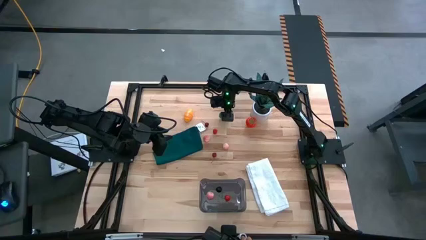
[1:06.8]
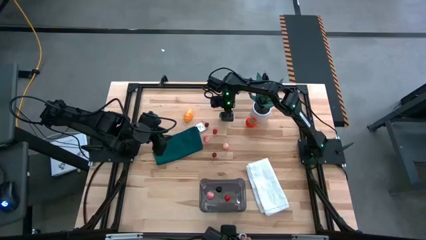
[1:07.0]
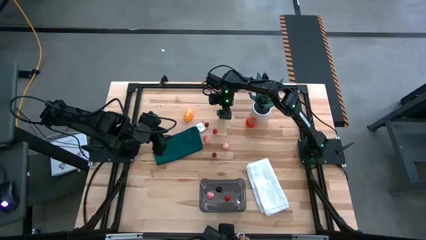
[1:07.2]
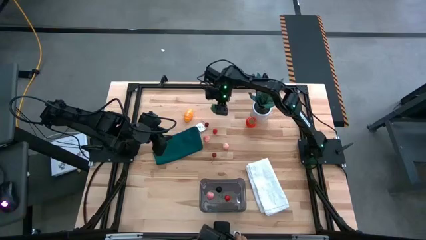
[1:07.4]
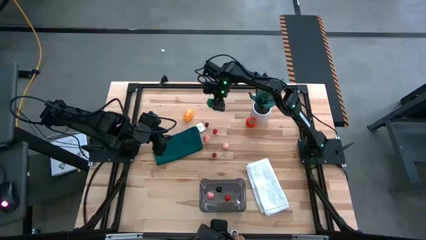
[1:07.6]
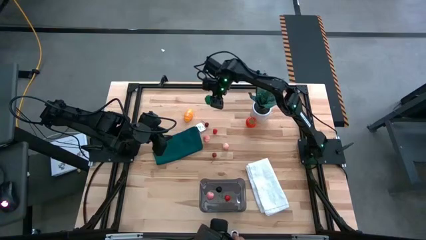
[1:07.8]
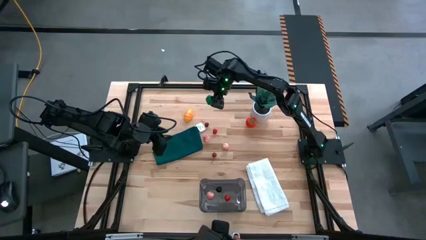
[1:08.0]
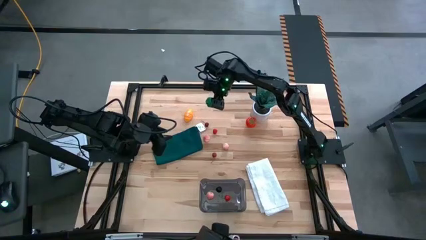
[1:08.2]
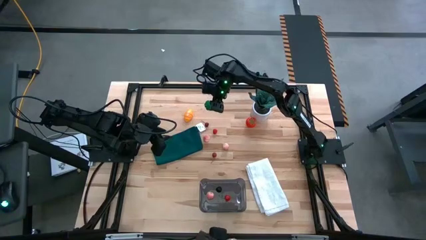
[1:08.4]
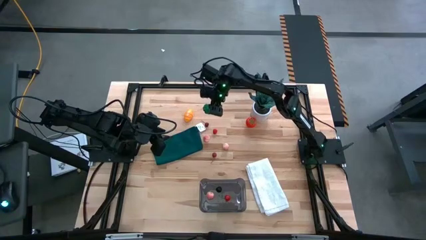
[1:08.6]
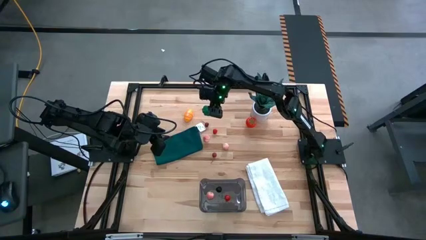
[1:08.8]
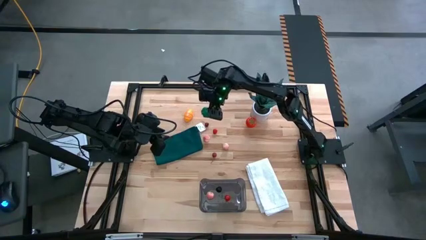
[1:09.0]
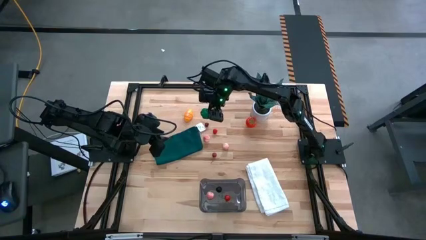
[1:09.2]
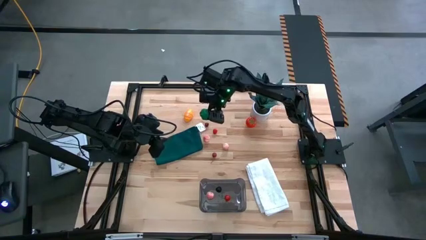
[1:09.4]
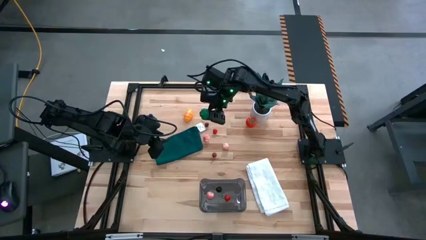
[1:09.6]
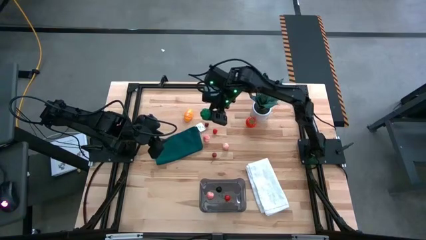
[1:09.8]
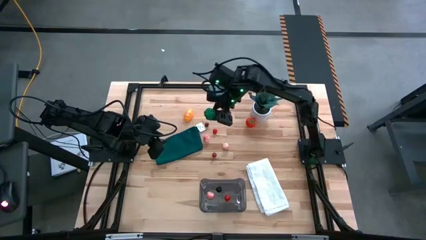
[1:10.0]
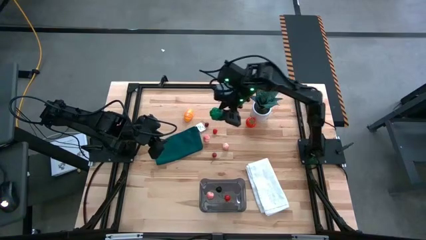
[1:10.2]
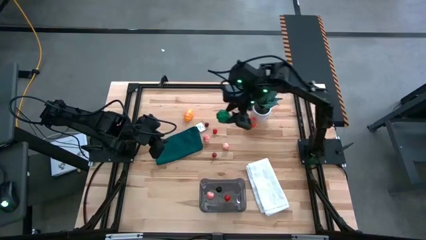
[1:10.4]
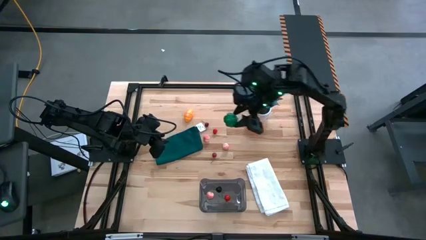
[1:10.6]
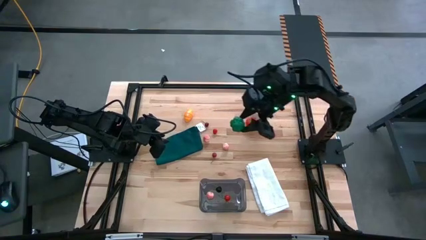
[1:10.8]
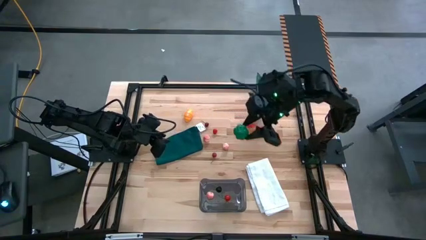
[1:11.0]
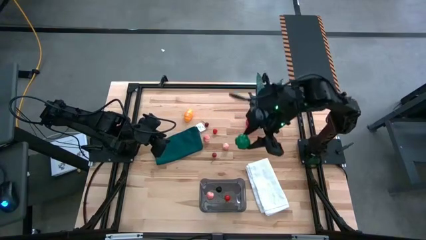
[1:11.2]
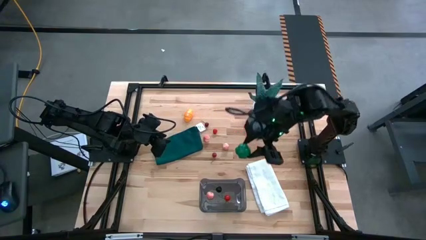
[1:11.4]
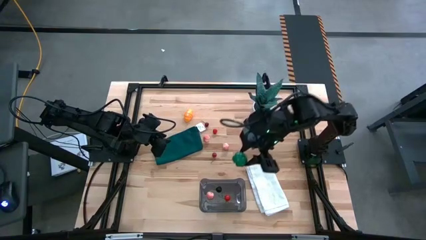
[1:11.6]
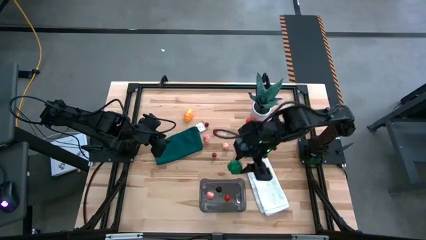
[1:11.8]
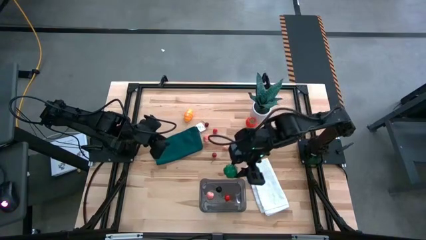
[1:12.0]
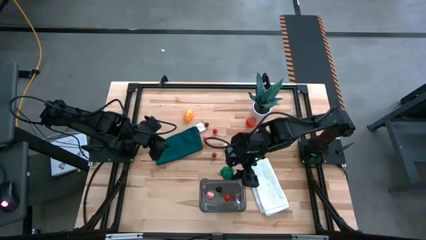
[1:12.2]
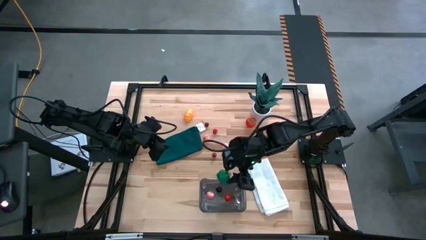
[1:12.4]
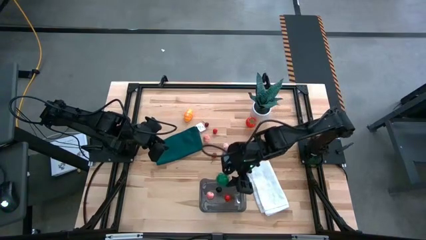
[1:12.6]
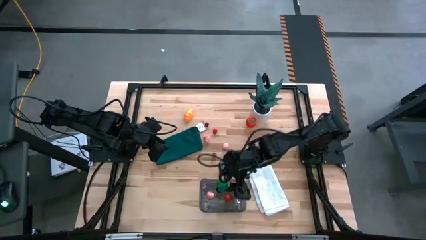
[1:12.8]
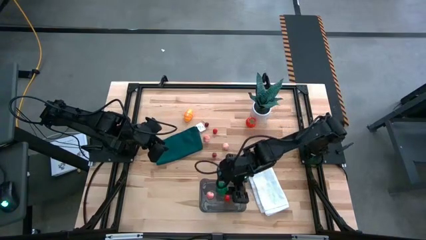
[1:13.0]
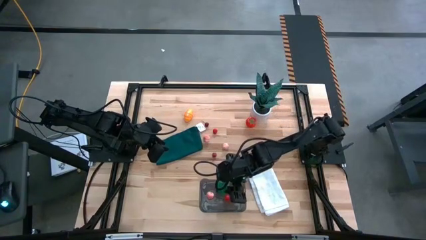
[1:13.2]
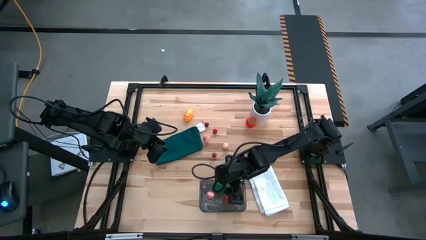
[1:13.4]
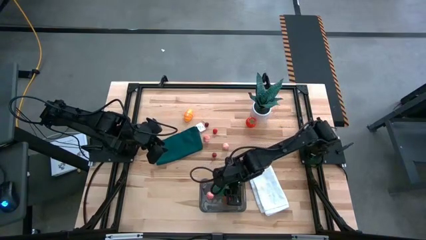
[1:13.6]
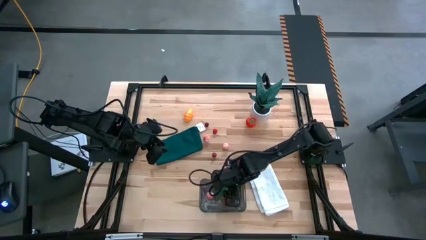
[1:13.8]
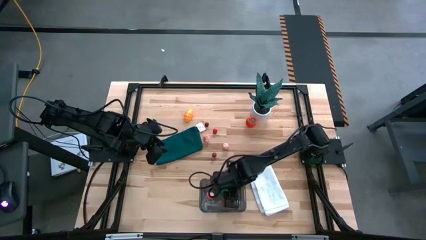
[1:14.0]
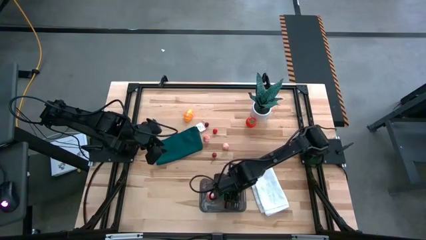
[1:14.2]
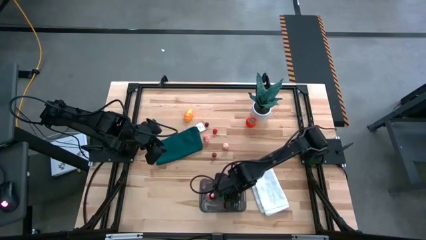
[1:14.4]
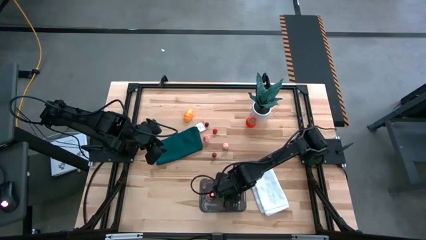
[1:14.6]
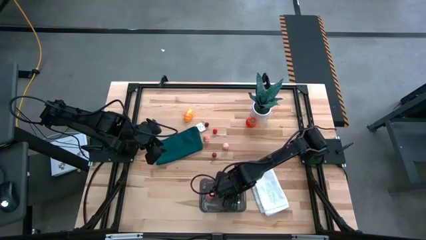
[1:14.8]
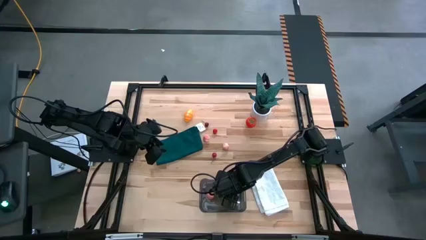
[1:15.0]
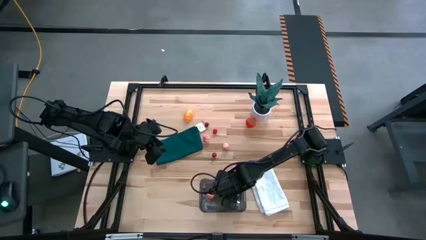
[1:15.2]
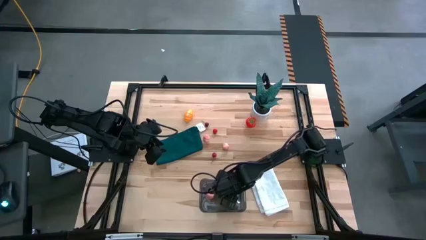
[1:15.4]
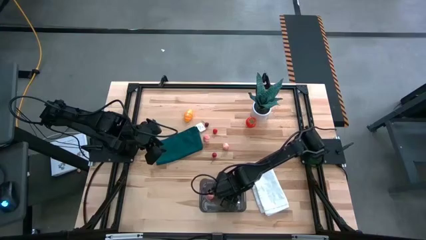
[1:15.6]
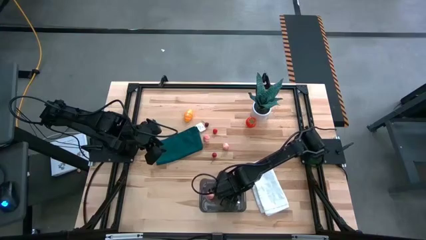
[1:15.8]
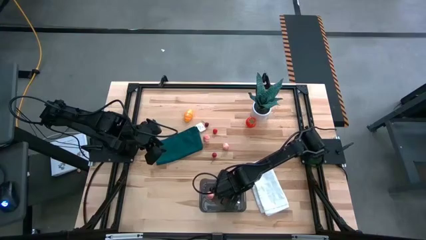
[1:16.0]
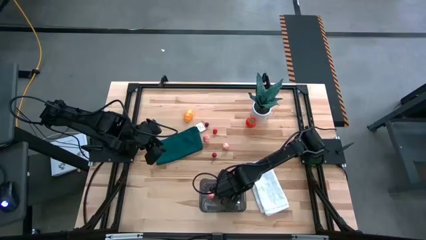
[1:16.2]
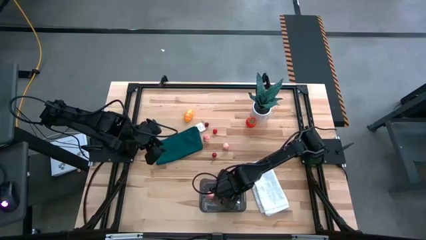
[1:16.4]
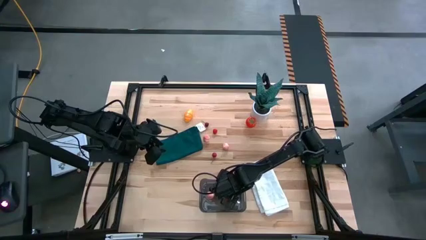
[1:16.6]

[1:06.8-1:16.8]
Task: Pick and placing Produce into tupperware
Put the green bell pepper into the black bin

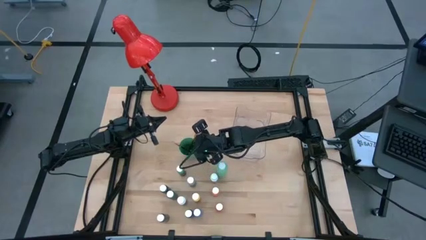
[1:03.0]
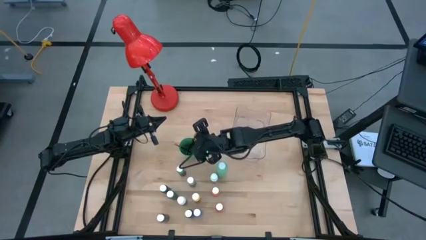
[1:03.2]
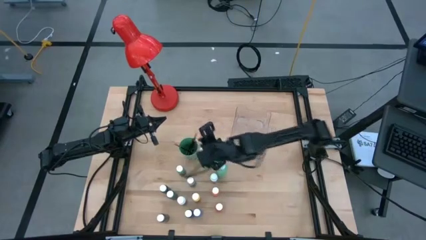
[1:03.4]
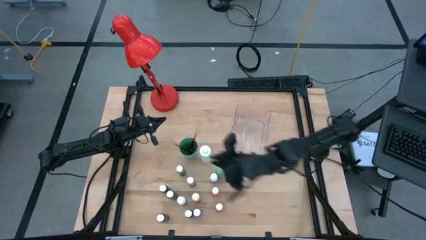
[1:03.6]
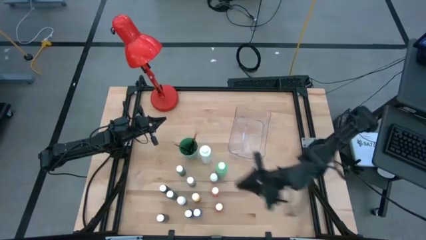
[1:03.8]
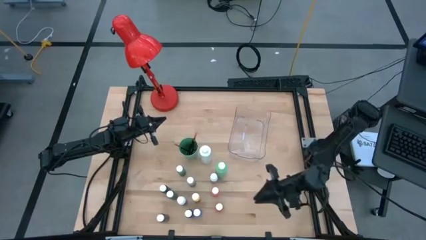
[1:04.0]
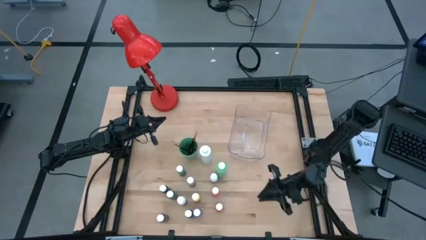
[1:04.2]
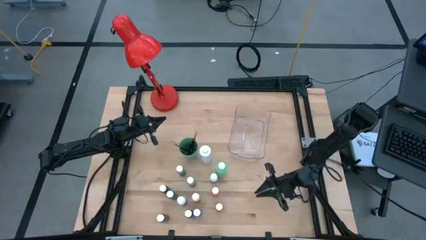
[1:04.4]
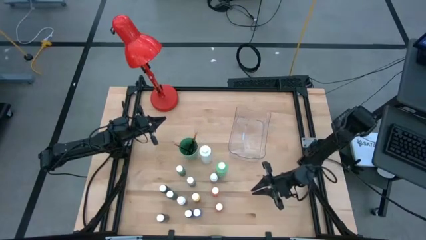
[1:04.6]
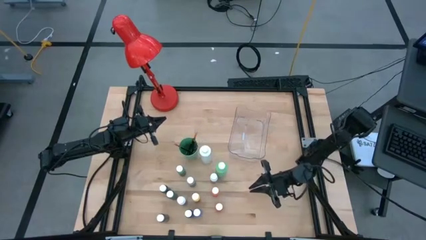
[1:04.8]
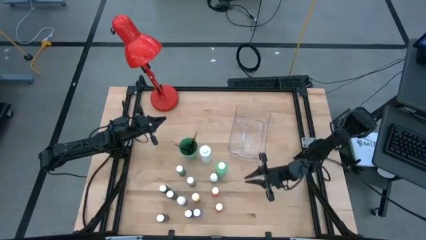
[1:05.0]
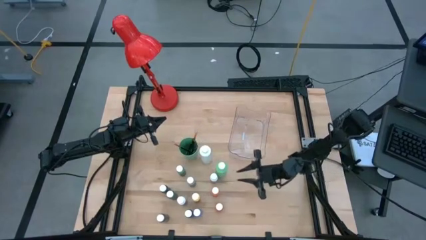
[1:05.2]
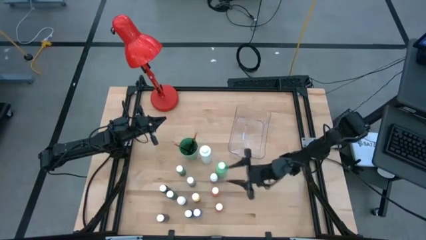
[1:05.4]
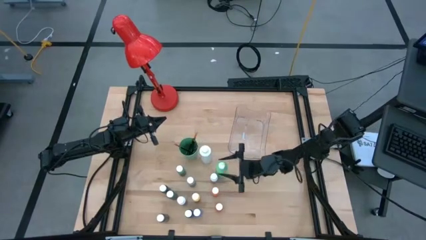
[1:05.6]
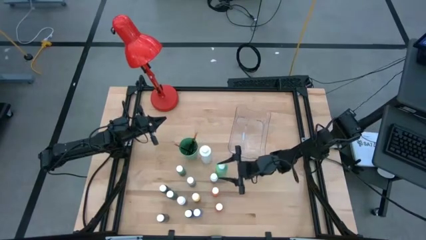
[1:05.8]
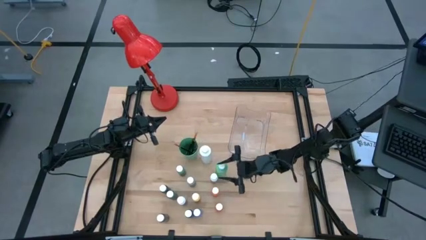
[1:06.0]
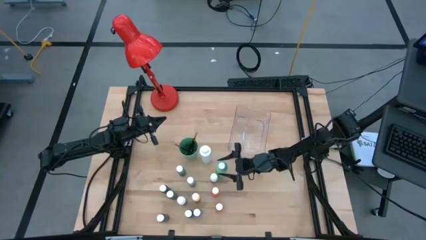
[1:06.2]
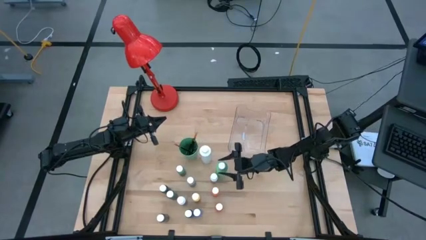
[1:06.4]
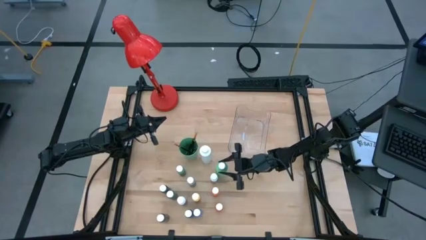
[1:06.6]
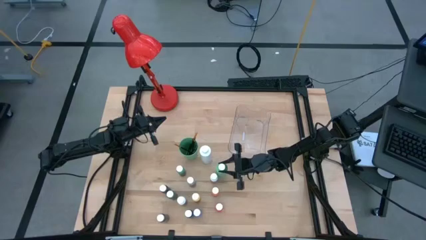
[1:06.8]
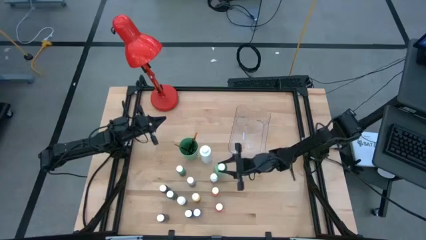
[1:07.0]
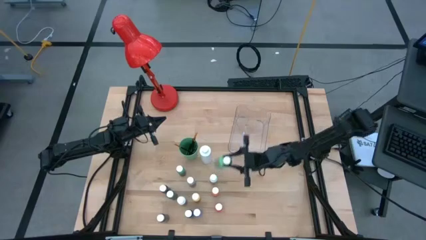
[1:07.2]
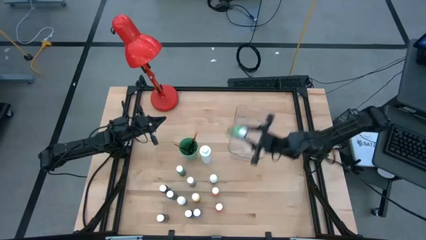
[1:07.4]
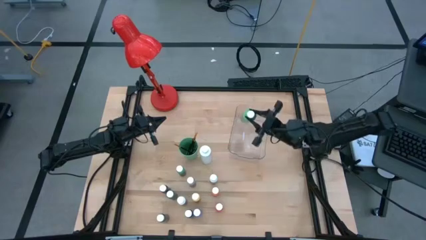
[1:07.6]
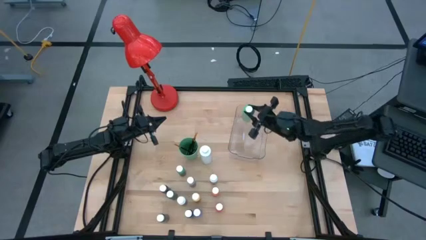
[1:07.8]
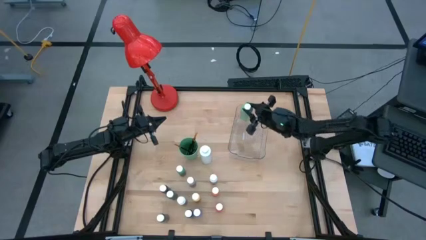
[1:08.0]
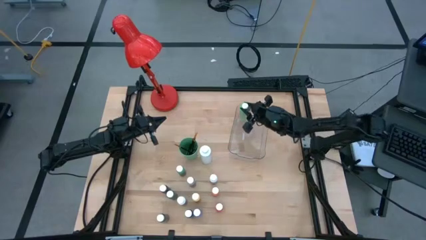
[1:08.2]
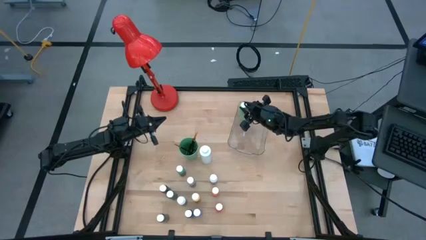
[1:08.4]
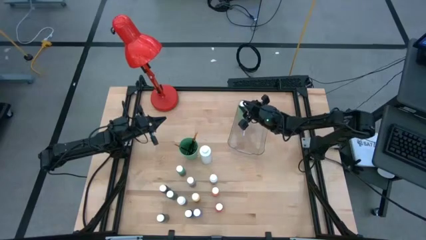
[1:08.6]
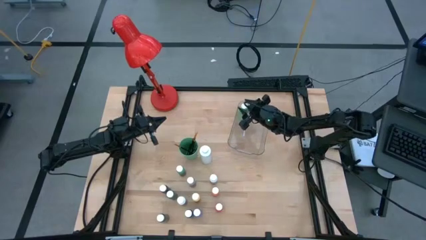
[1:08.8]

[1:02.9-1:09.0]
Task: Pick & Place Paint Supplies
Put the large green paint bottle into the transparent bin
